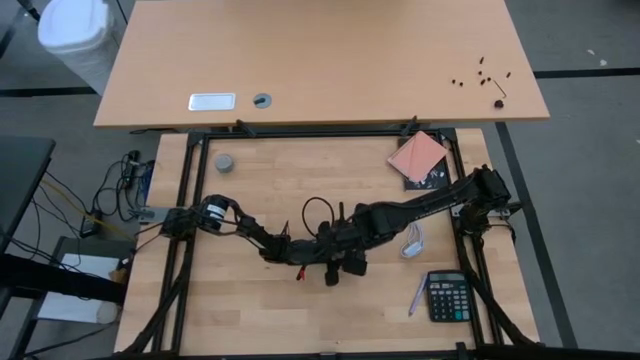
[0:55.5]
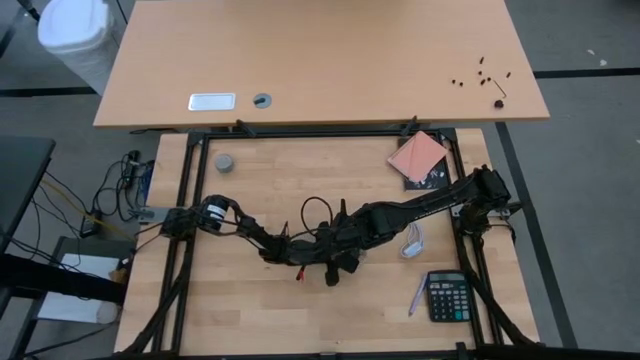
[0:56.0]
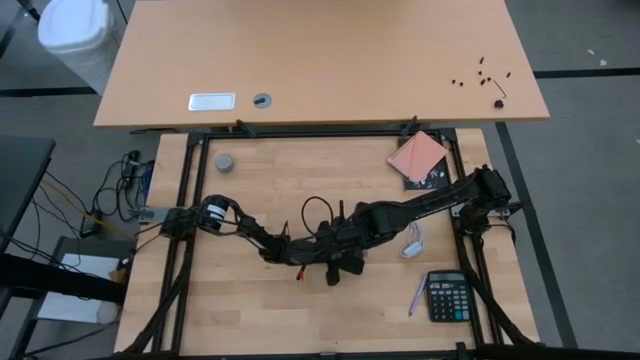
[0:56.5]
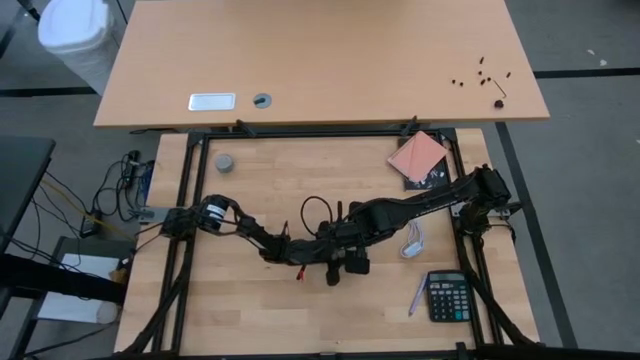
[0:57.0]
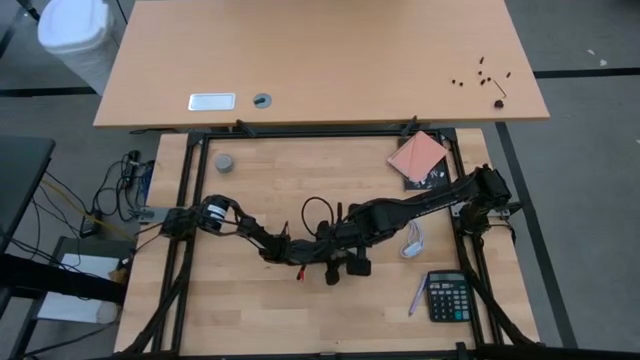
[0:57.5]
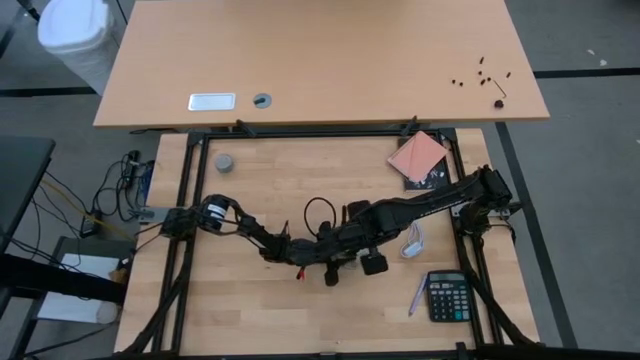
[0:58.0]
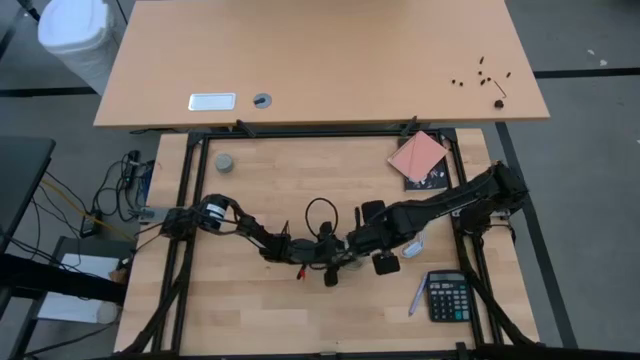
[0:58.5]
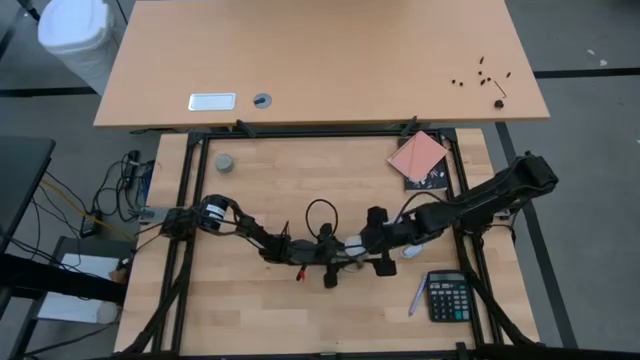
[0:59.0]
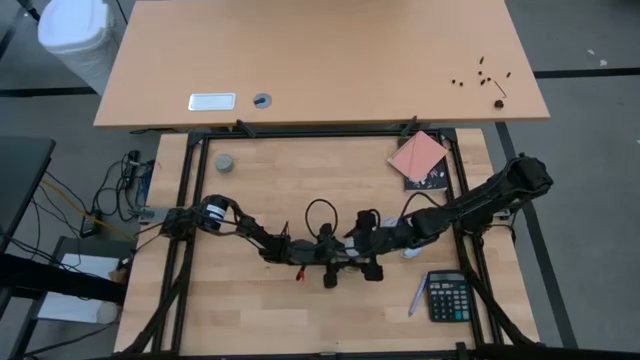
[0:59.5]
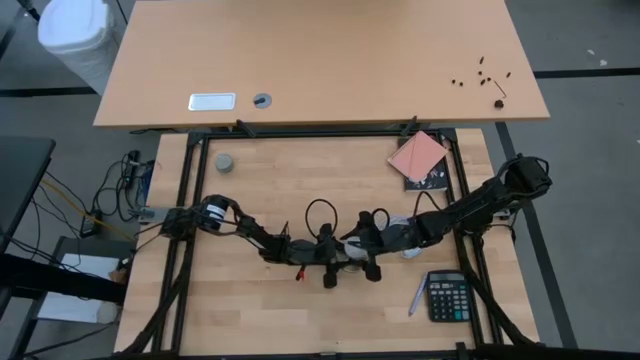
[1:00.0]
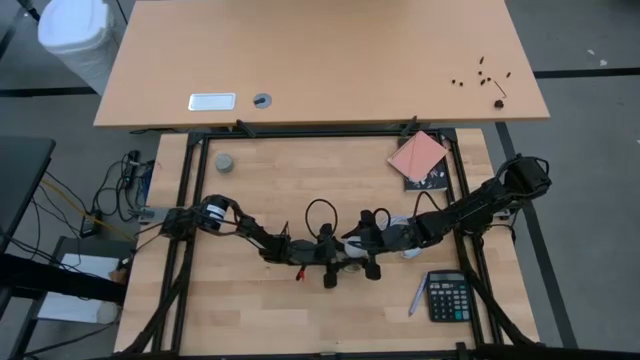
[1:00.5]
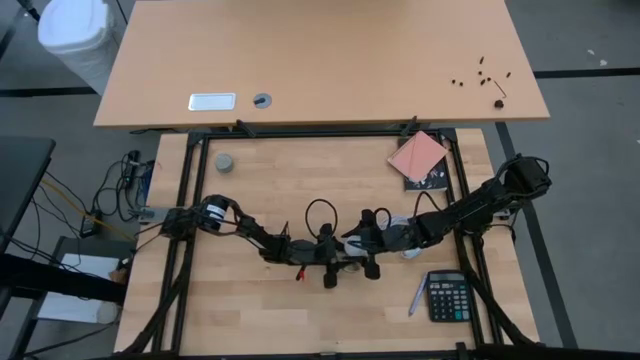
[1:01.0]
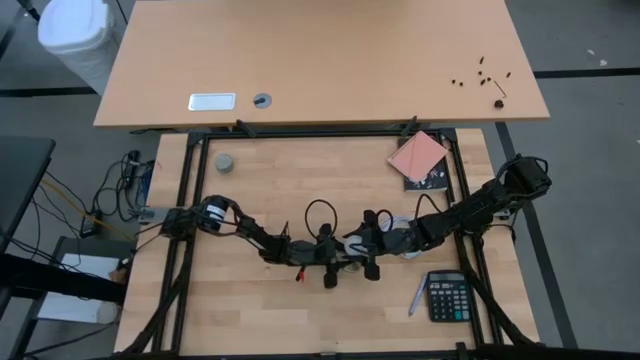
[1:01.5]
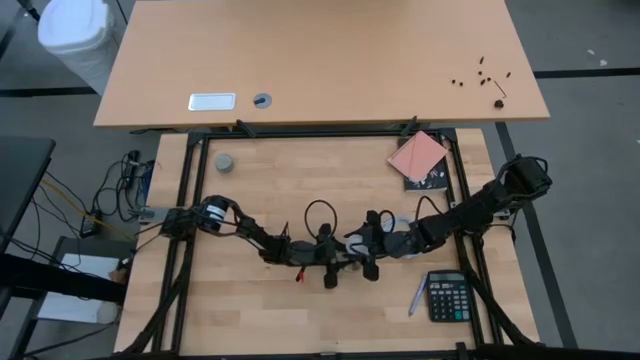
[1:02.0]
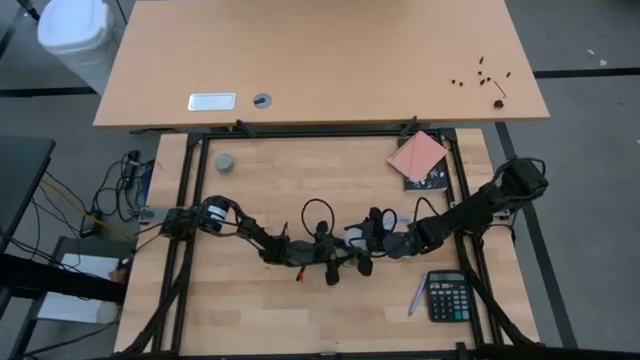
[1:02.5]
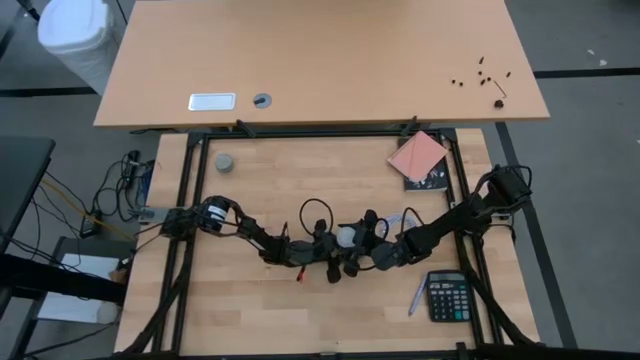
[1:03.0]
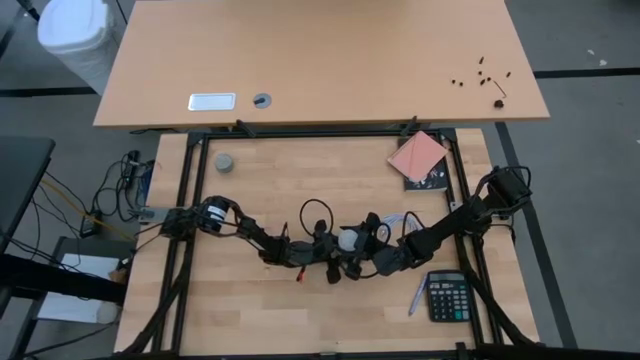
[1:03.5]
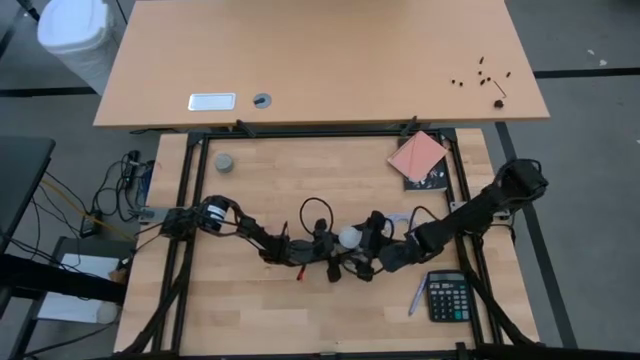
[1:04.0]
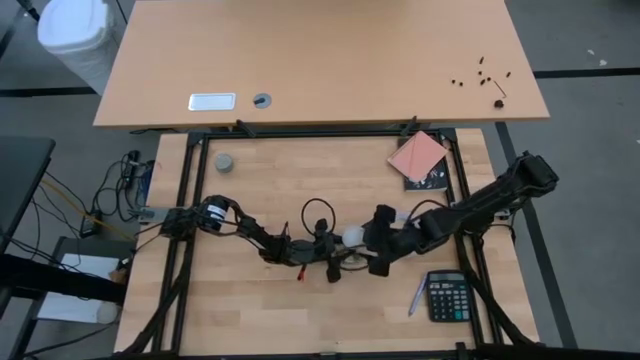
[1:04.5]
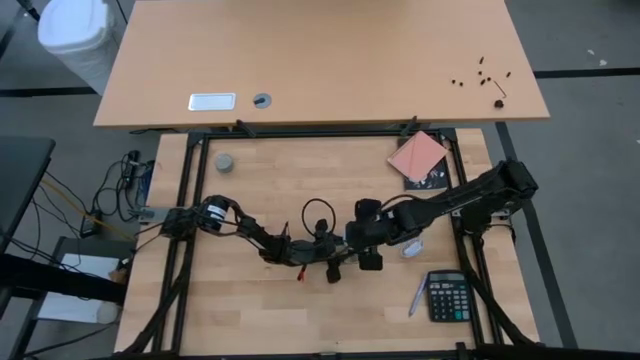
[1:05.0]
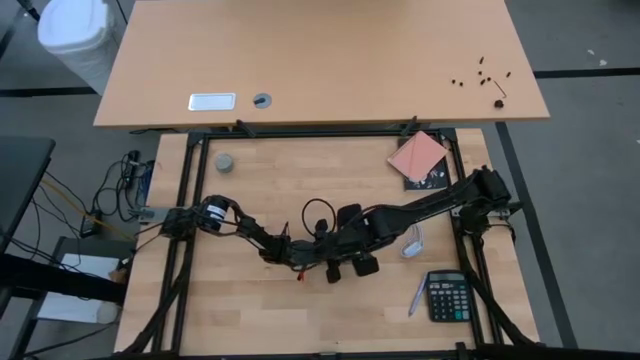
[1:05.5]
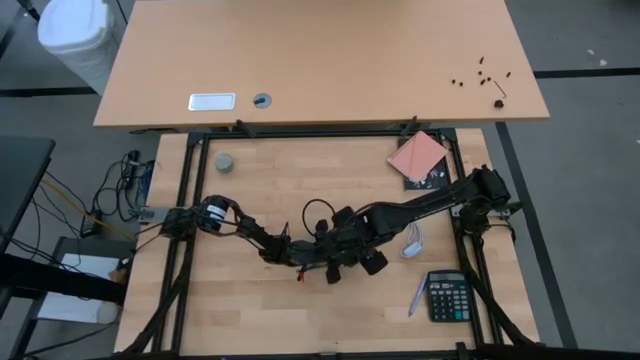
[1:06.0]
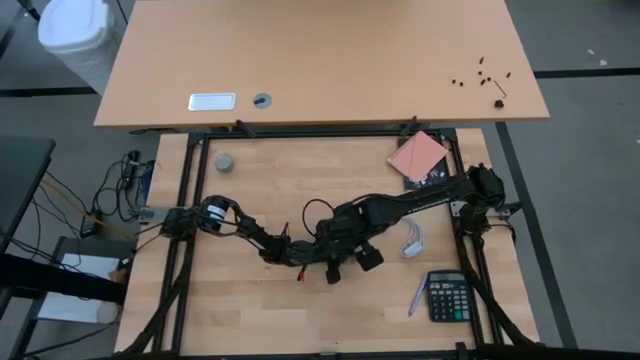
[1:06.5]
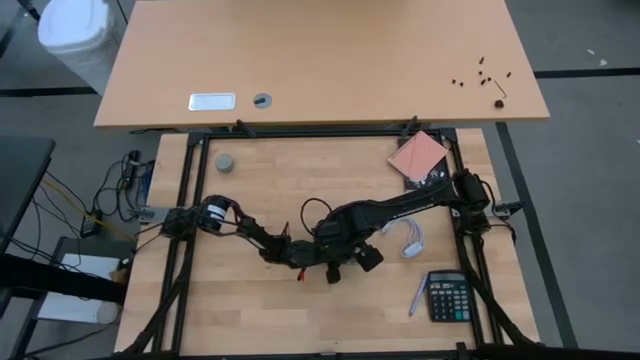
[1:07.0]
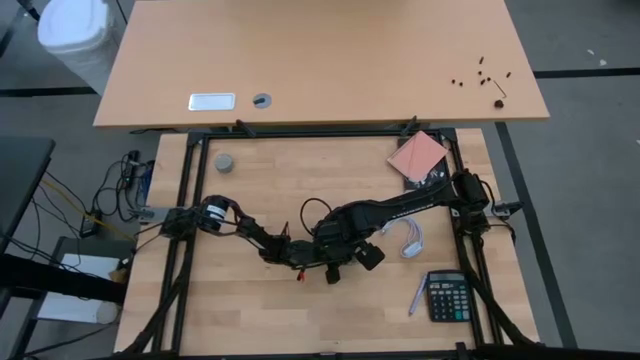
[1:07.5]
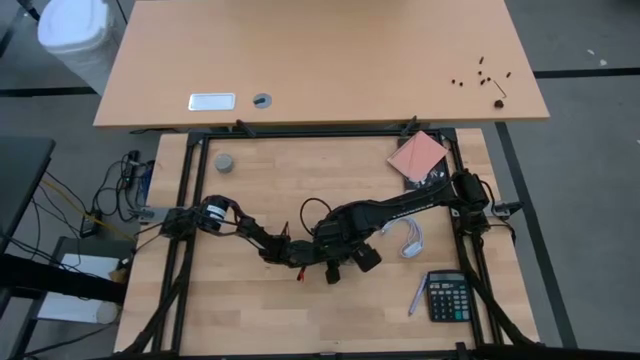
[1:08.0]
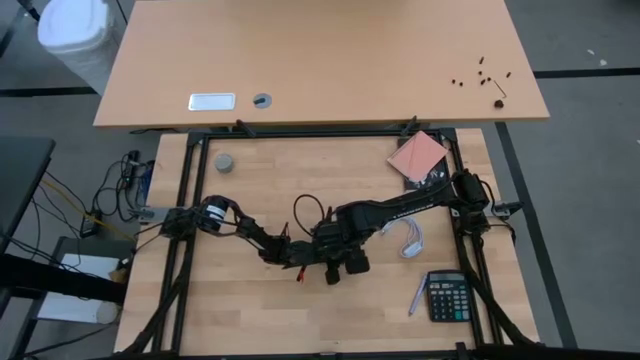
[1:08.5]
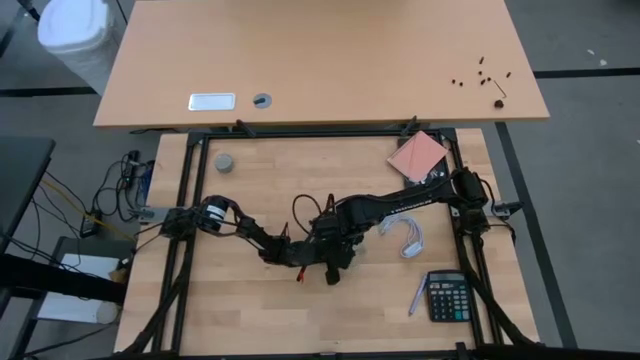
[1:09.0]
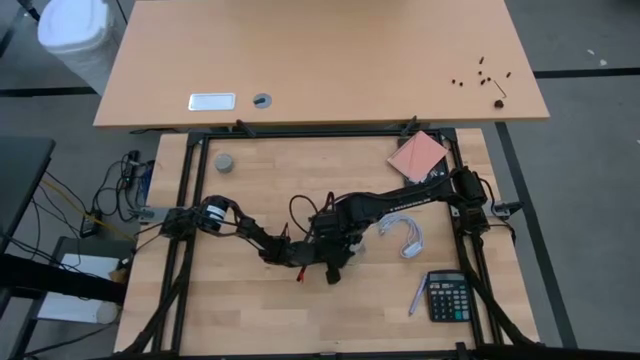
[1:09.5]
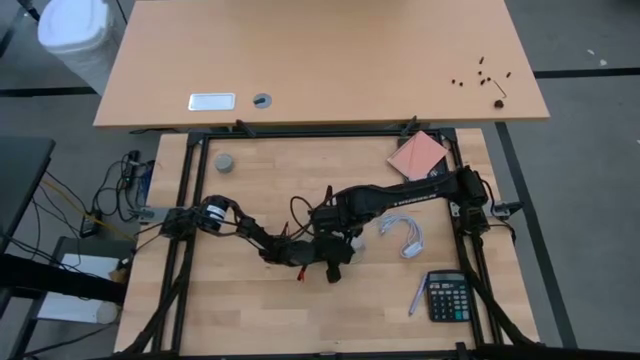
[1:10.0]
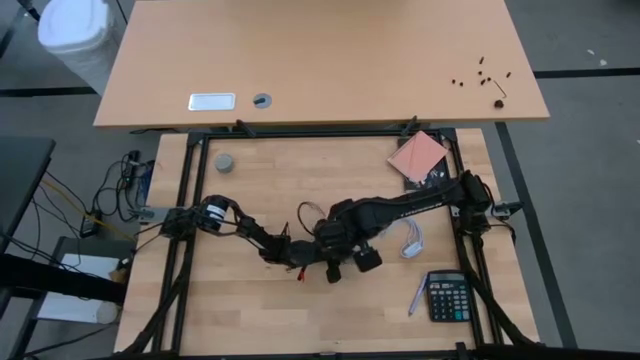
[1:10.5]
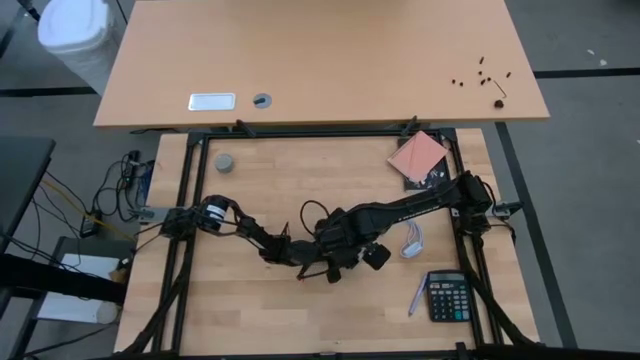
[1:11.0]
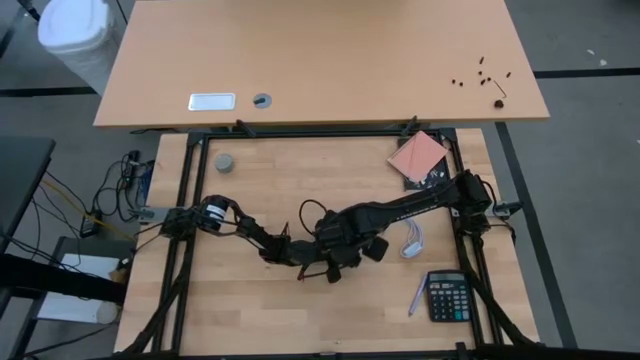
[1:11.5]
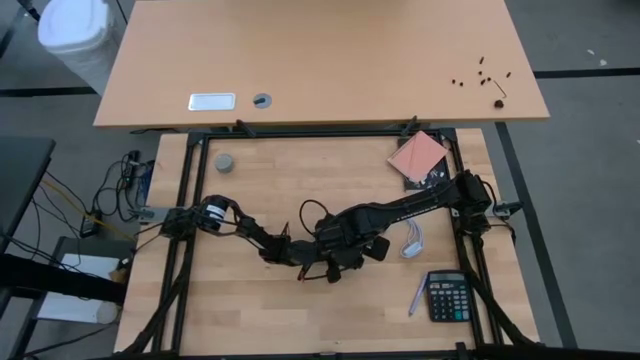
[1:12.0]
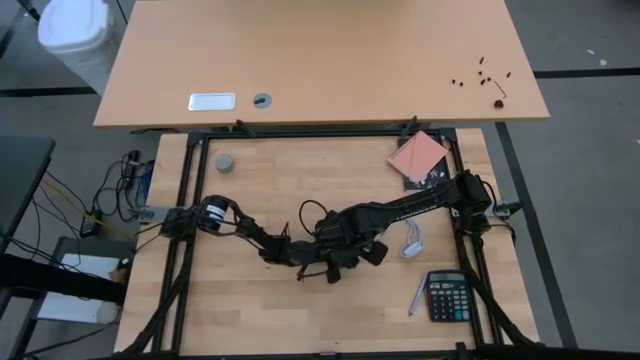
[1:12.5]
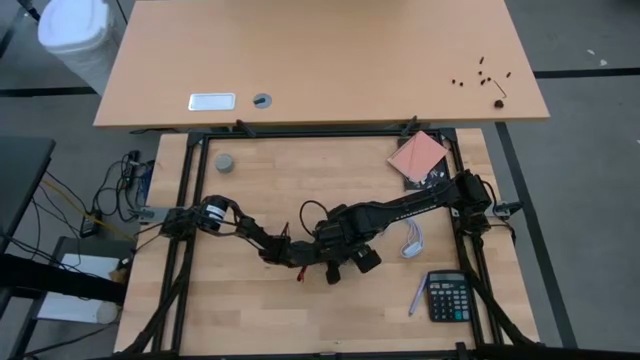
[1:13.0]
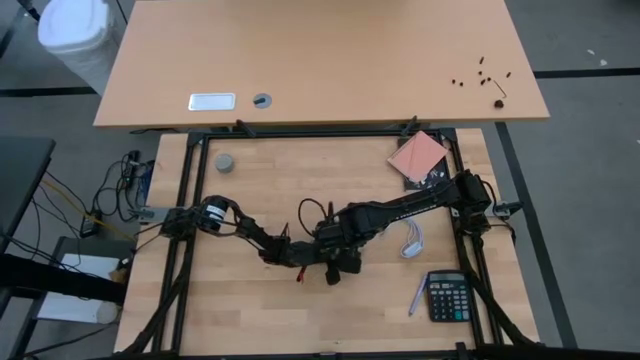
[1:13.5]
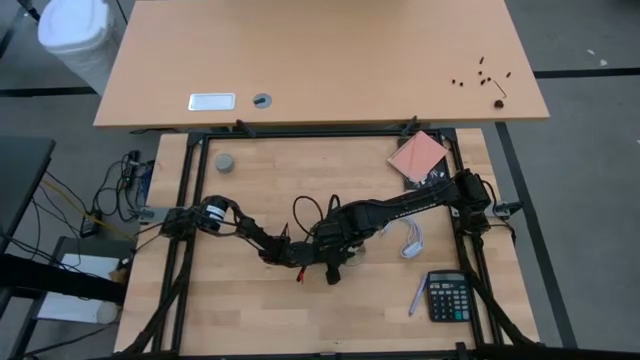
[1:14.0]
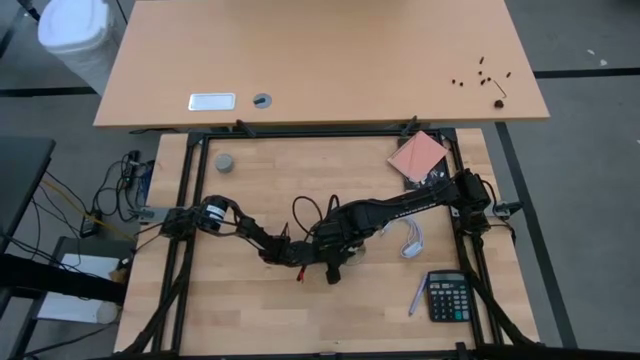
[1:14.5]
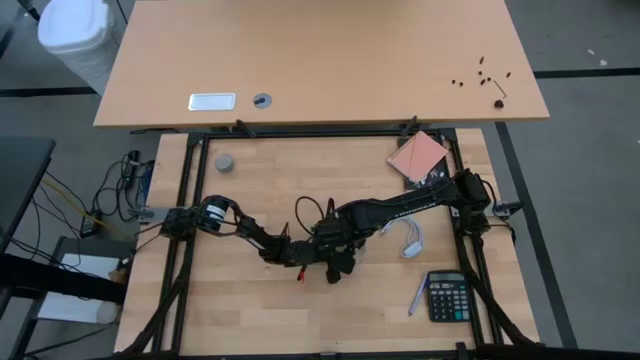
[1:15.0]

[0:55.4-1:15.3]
Task: Screw lightbulb
Insert the white lightbulb into the golden lamp
